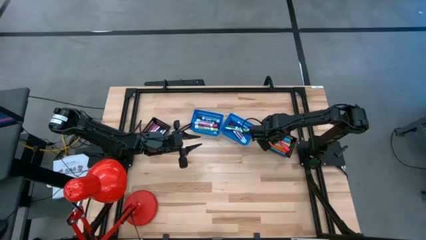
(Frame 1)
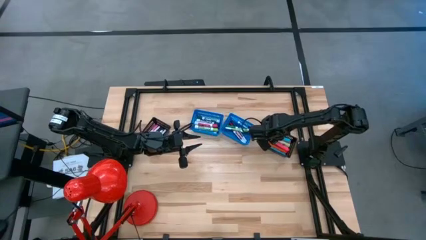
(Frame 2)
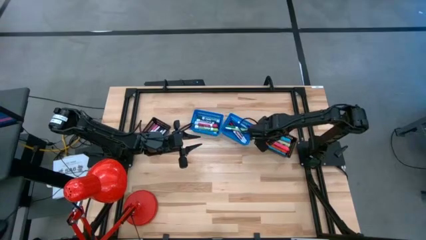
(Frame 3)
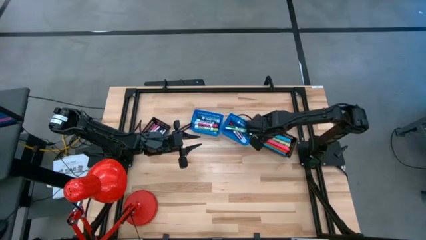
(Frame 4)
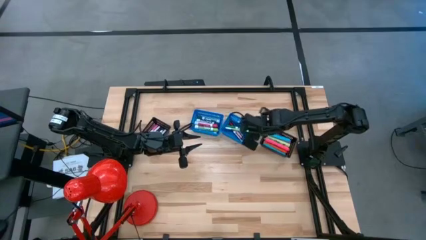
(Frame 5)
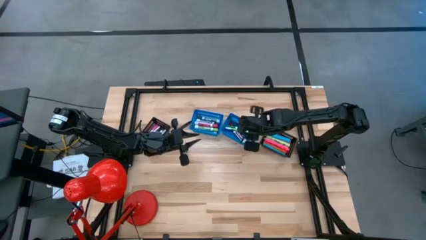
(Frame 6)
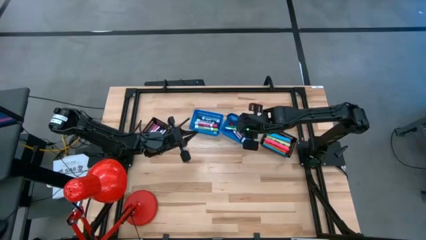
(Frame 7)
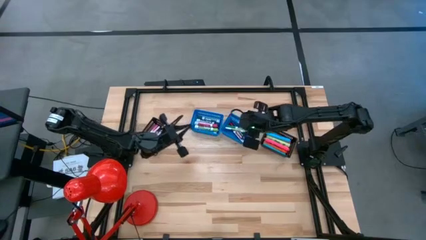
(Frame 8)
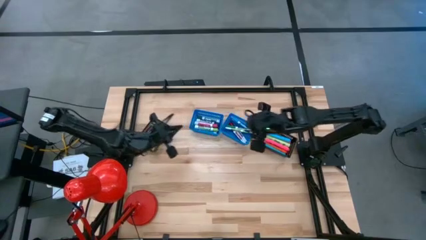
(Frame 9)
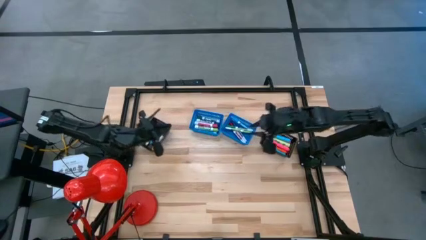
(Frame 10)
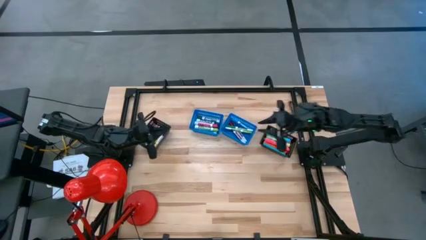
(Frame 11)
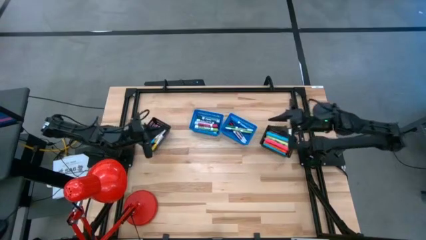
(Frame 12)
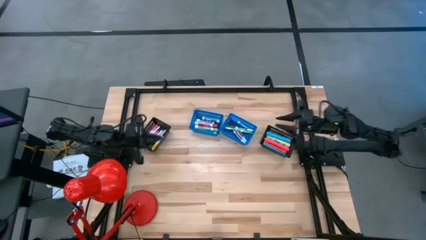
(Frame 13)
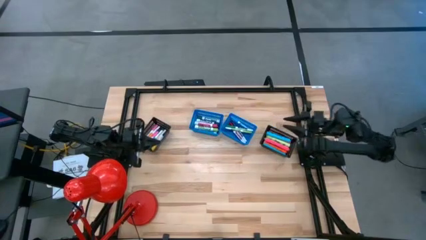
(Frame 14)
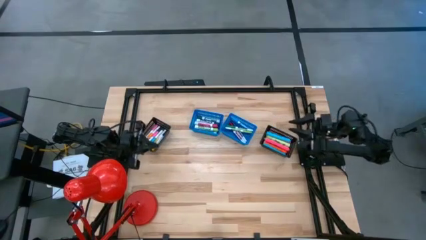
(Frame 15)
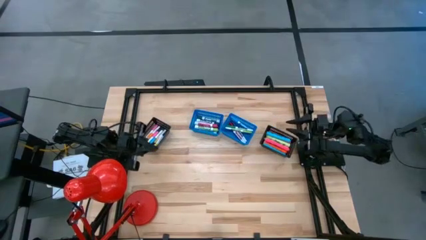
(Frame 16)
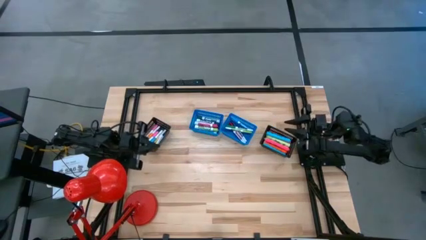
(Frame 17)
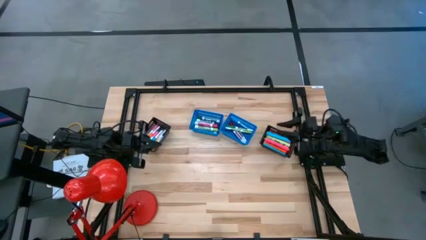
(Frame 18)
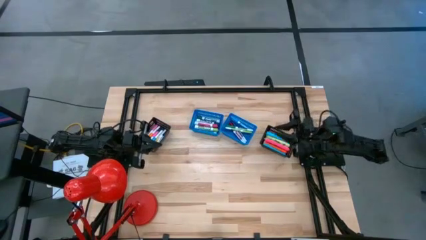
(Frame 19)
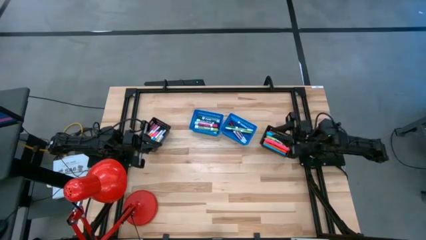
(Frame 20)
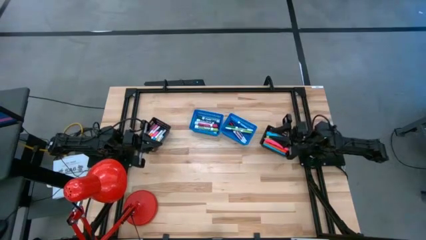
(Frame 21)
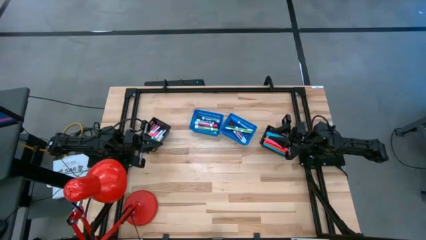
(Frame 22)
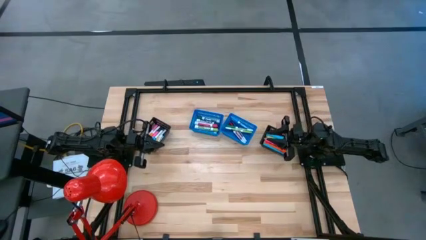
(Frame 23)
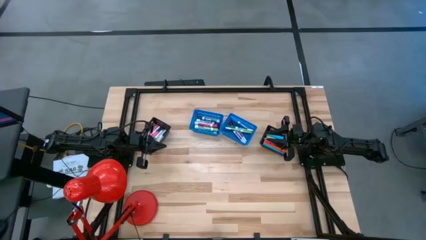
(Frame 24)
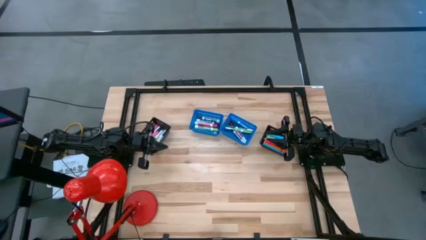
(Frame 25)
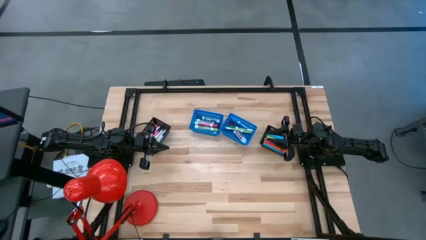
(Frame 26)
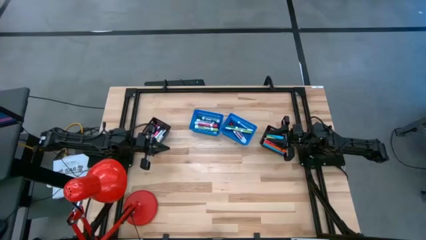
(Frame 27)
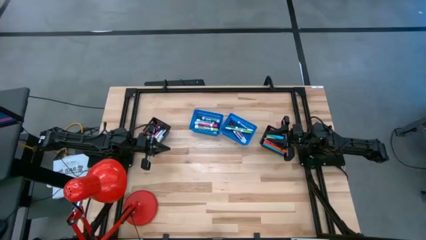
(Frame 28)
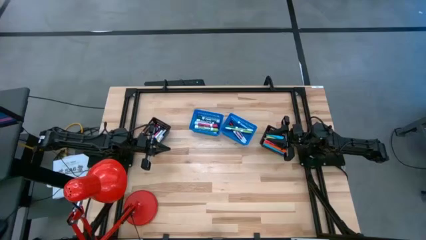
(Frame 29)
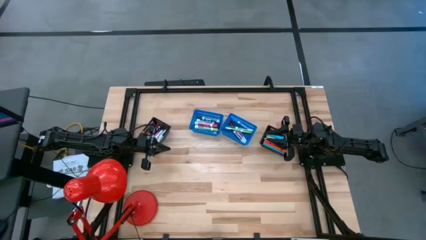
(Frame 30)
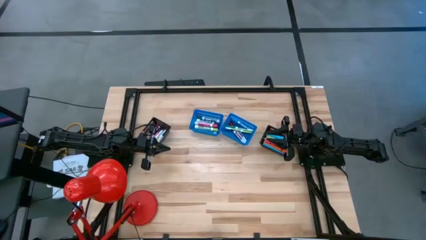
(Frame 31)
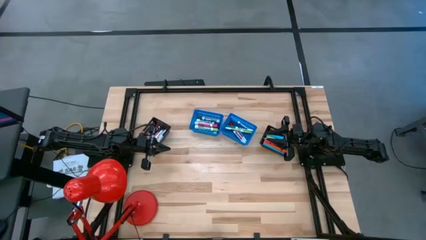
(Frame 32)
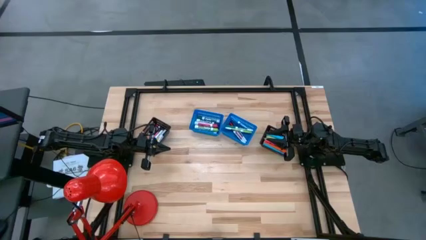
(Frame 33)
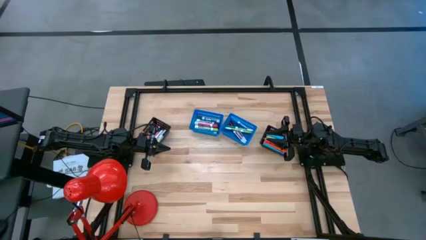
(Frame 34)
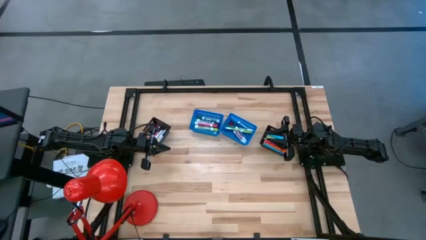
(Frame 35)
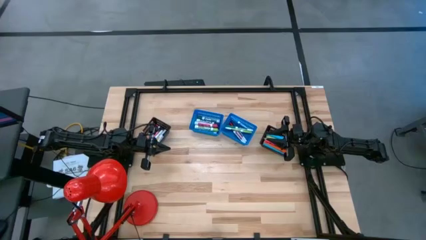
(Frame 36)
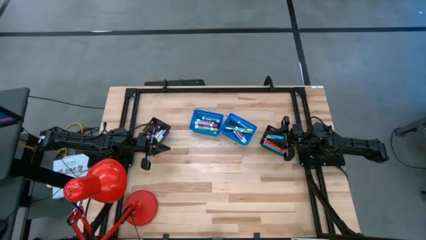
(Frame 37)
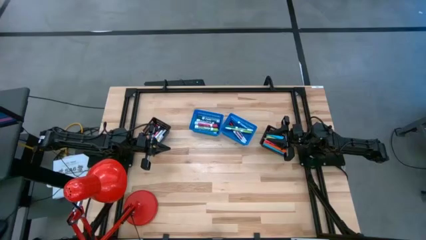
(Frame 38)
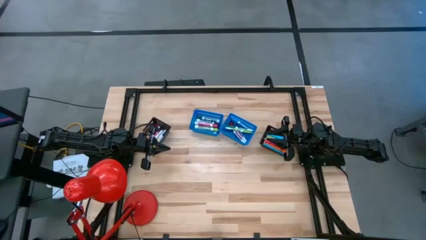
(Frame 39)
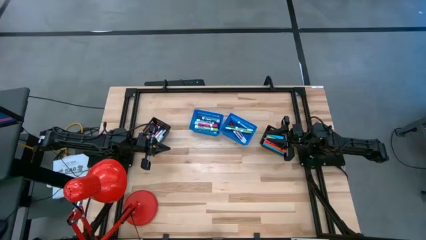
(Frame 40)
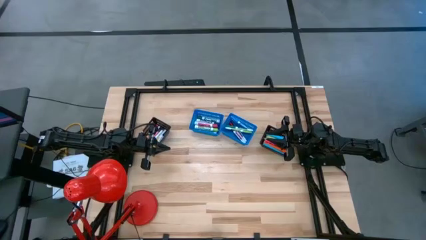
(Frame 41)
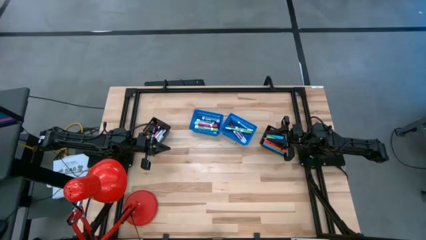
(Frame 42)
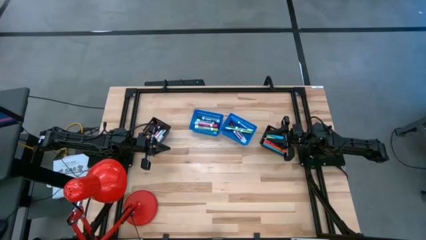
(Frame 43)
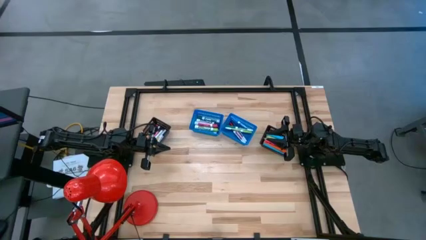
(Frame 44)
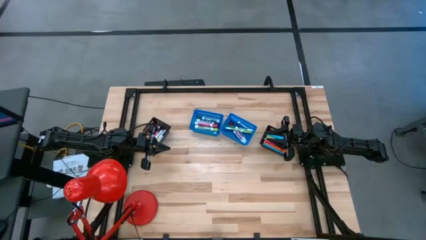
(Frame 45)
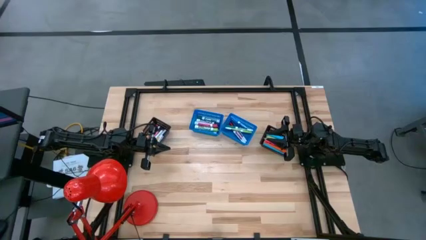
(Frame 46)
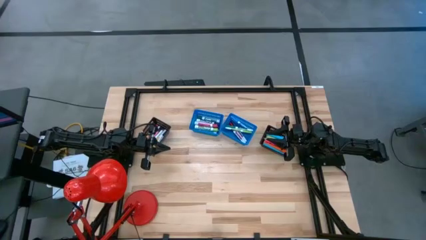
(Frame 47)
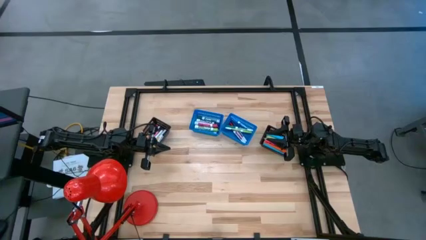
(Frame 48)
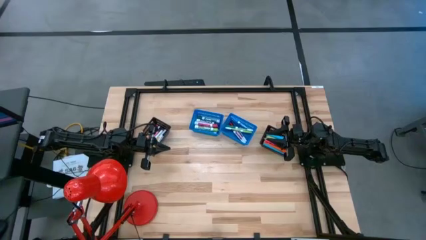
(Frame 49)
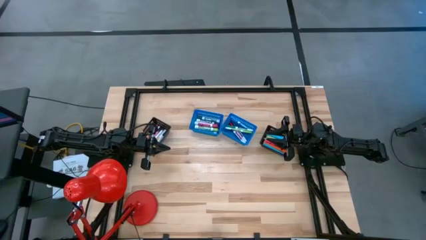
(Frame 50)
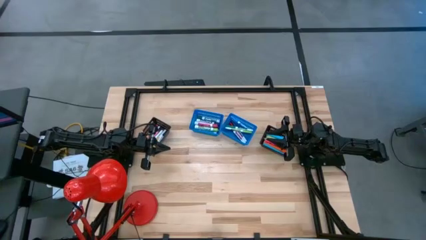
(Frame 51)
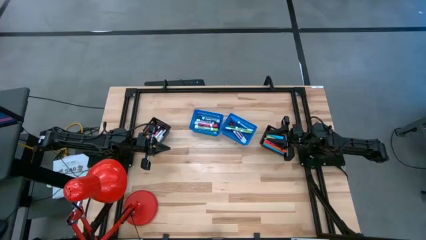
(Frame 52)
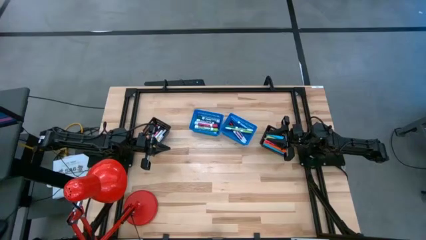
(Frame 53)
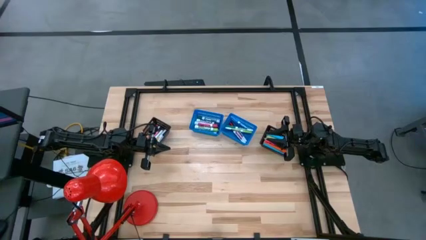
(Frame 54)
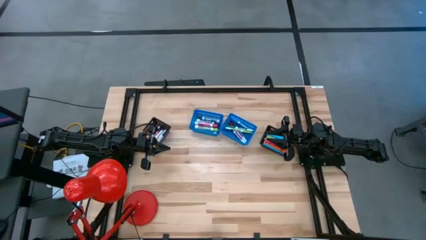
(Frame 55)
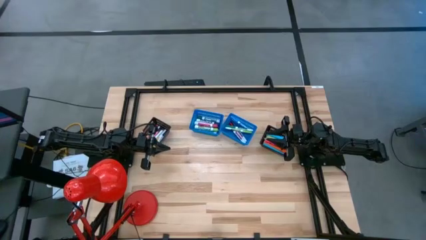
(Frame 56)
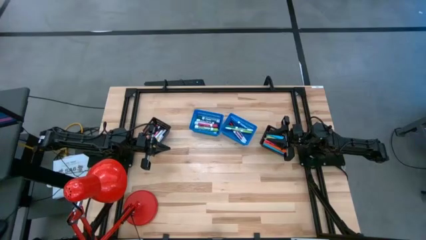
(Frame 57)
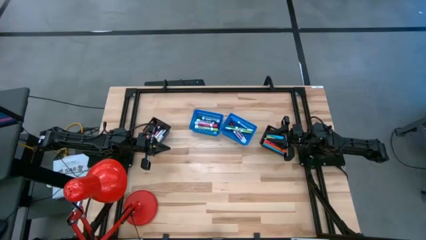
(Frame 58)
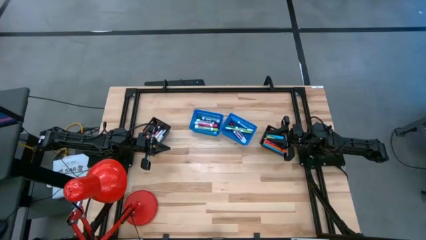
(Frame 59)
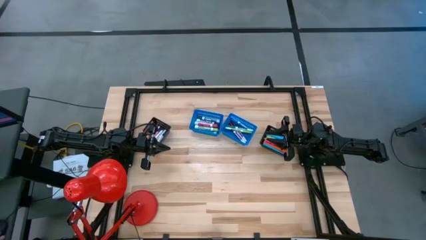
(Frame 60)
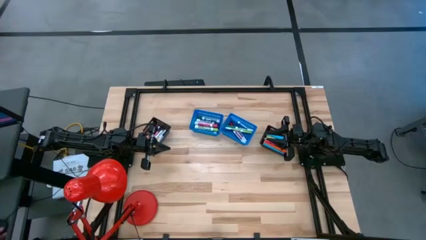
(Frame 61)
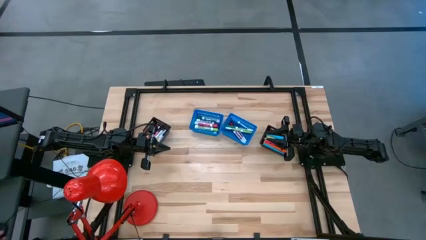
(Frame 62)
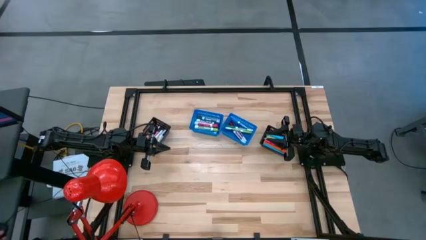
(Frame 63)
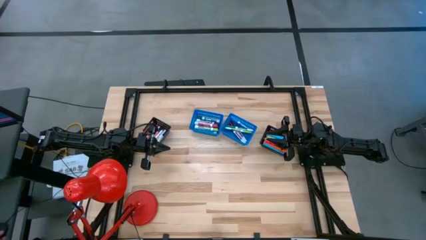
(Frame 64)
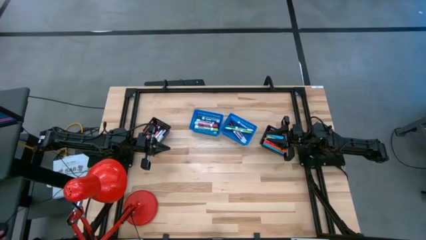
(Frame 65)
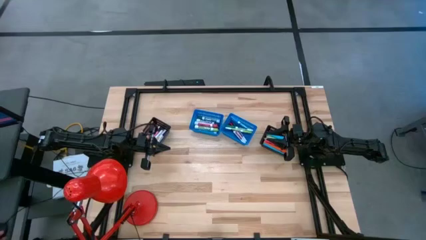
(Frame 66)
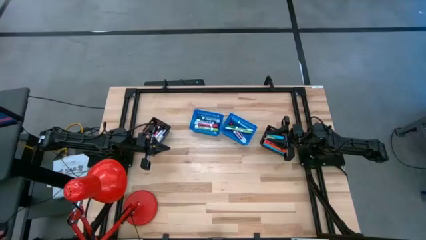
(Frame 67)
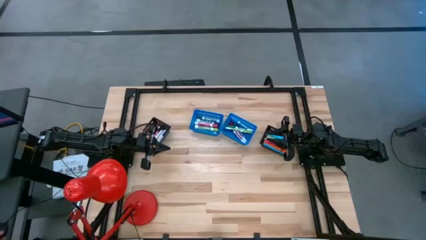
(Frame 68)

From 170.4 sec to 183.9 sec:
Task: Pick & Place Markers
Return to Home Position

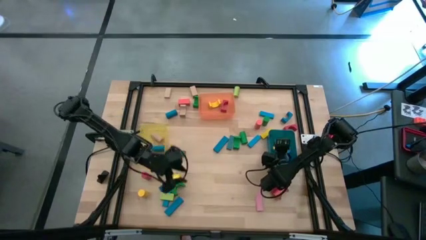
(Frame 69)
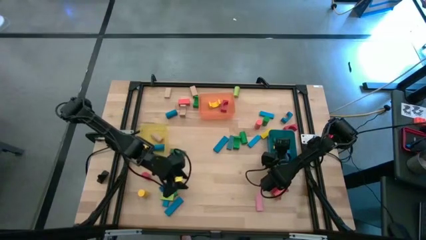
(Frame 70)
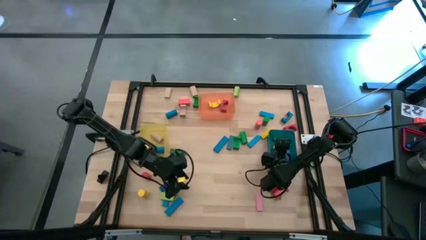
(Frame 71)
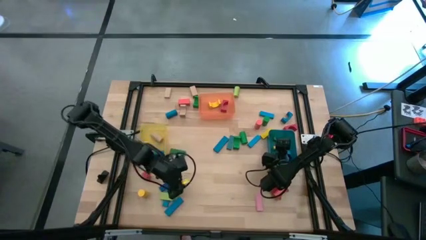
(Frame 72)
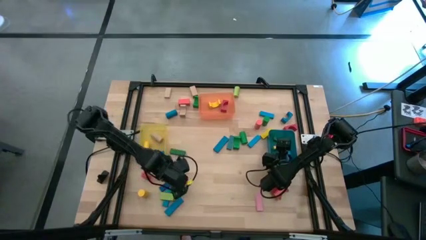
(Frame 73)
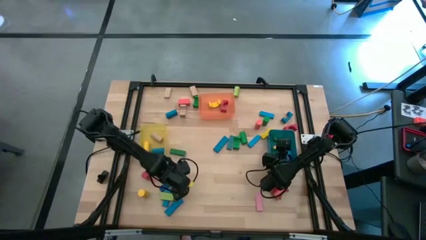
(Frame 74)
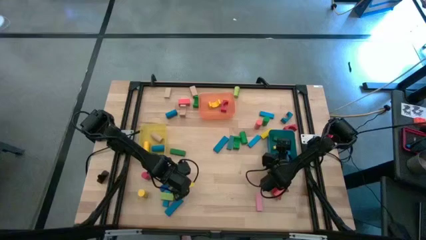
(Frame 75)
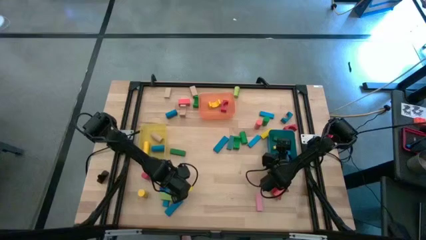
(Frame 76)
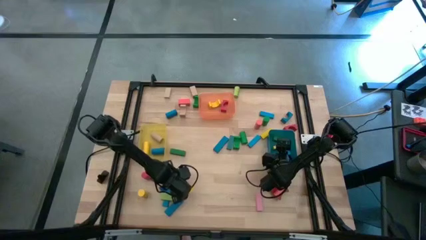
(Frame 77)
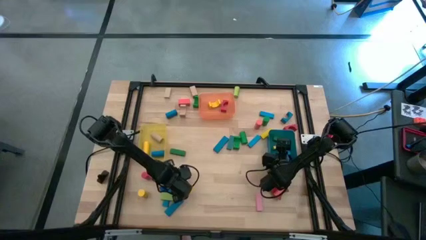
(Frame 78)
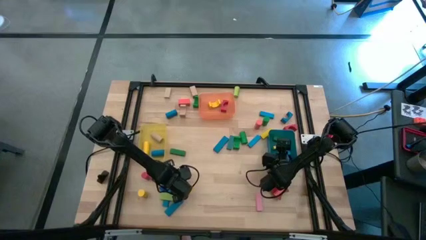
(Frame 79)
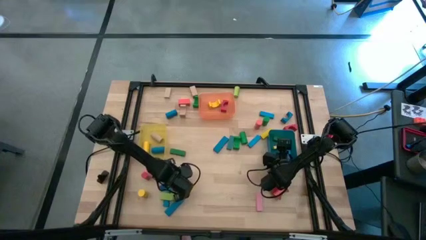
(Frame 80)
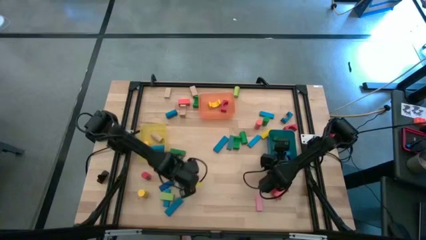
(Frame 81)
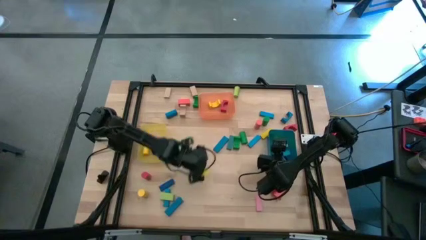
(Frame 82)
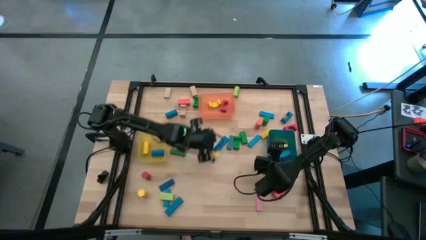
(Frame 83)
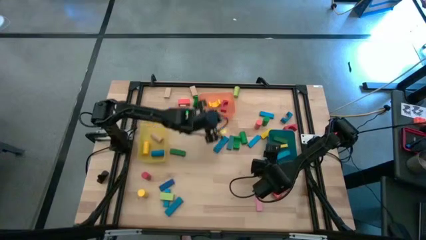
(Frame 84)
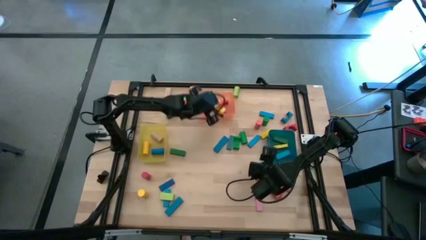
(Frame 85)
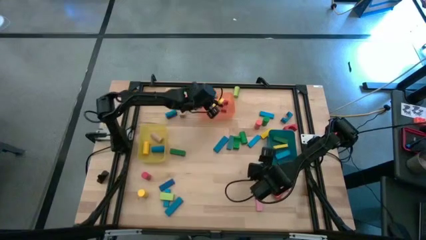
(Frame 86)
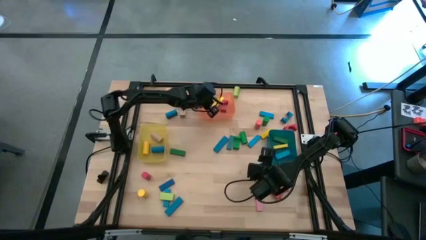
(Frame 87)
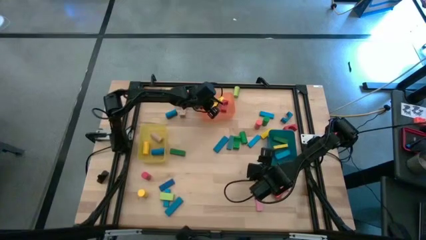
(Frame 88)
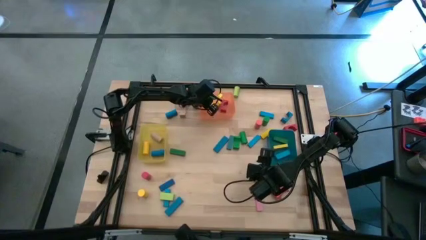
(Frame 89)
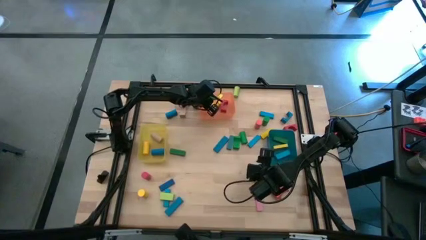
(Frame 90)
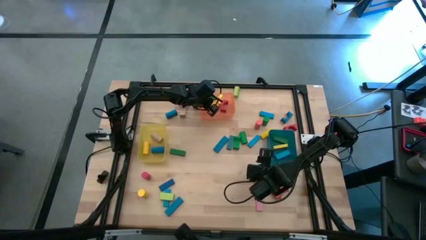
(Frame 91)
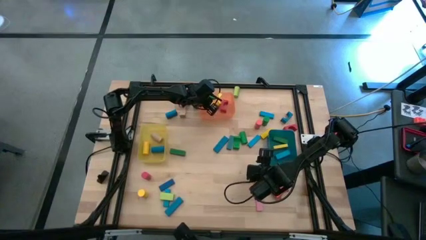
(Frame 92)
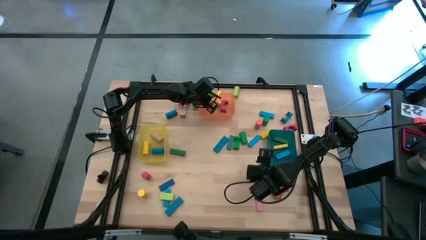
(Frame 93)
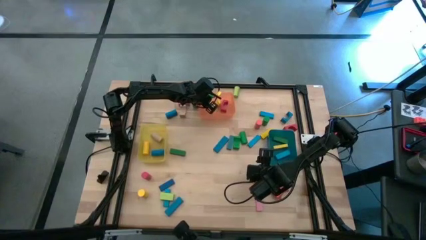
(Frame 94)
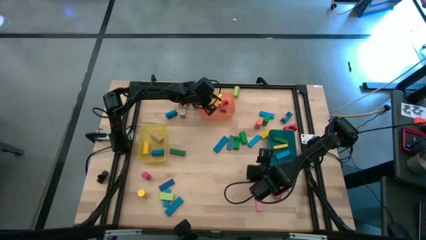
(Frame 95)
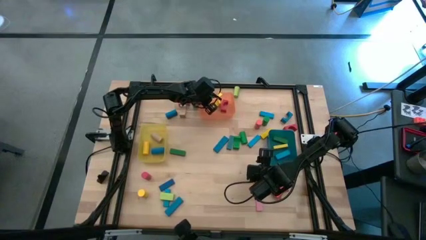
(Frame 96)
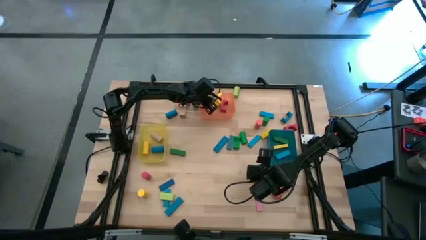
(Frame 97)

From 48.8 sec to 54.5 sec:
Task: Sort blocks by size
Put the green arch block into the orange bin
